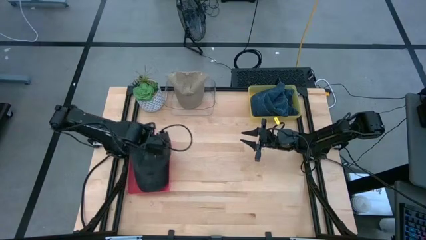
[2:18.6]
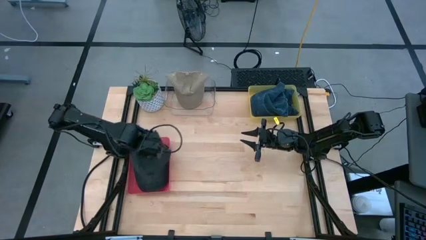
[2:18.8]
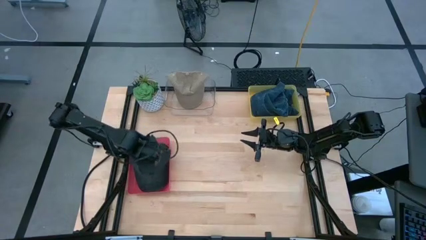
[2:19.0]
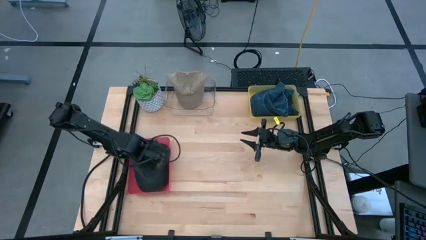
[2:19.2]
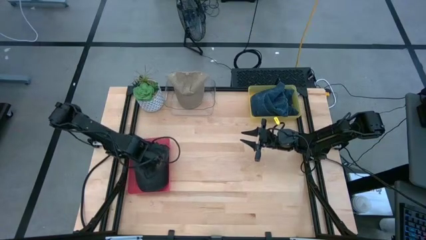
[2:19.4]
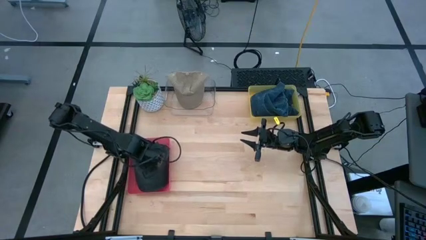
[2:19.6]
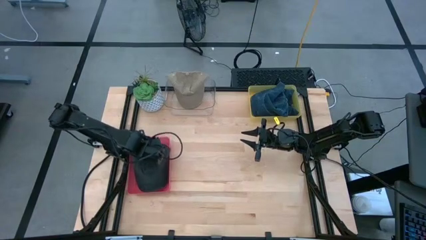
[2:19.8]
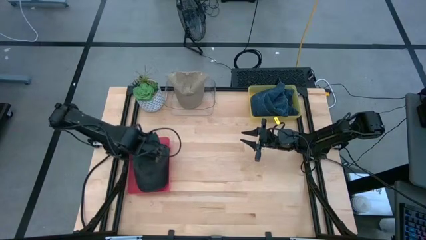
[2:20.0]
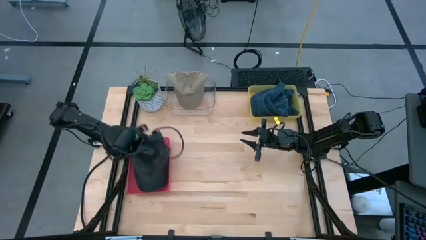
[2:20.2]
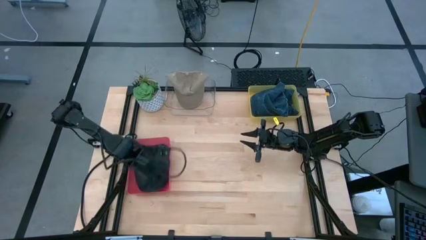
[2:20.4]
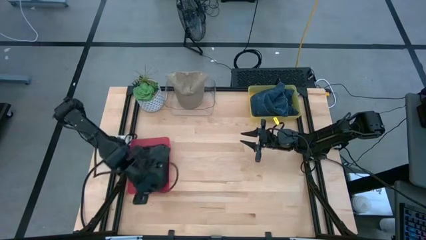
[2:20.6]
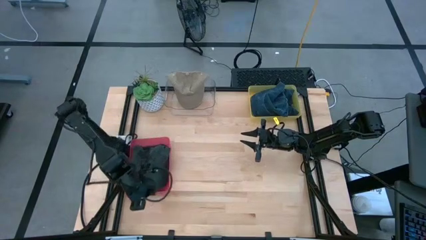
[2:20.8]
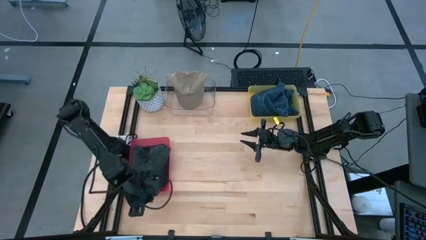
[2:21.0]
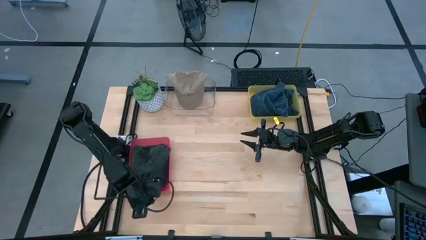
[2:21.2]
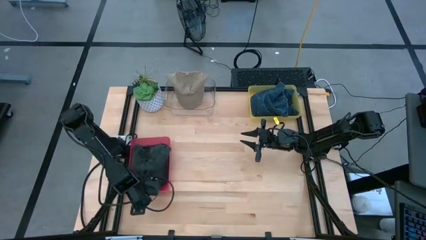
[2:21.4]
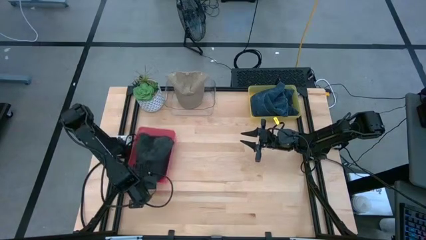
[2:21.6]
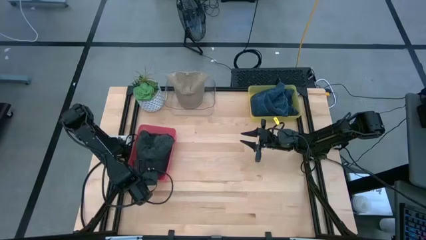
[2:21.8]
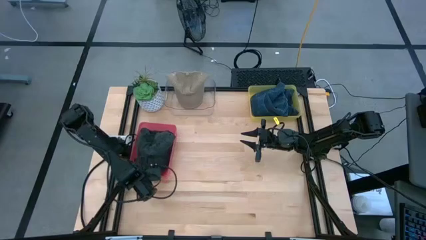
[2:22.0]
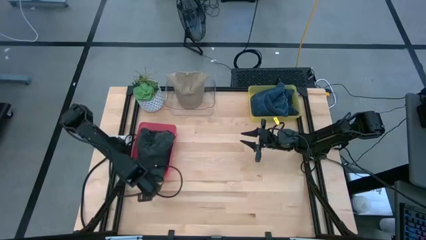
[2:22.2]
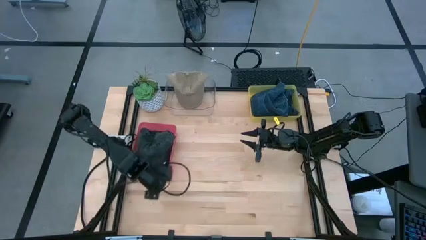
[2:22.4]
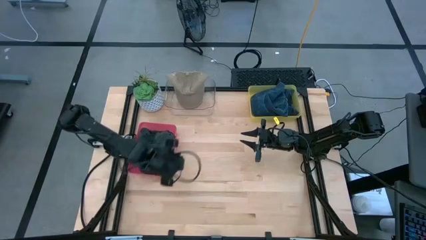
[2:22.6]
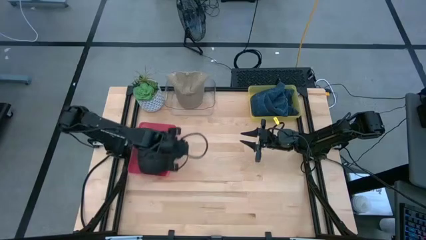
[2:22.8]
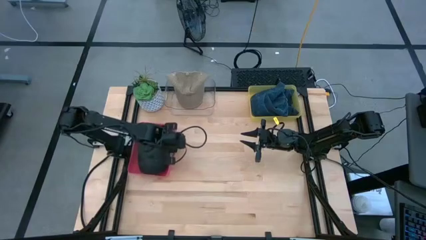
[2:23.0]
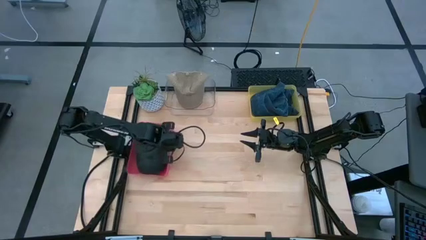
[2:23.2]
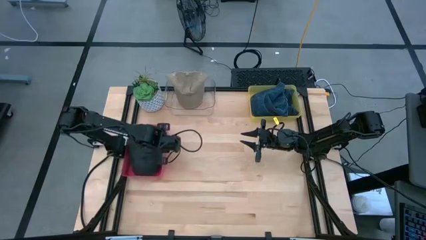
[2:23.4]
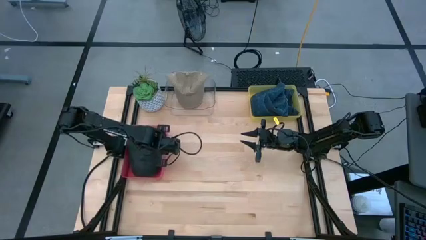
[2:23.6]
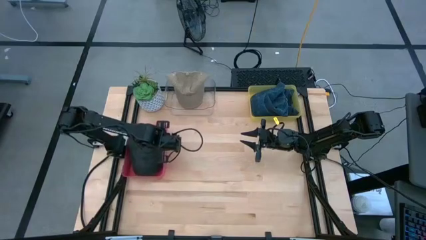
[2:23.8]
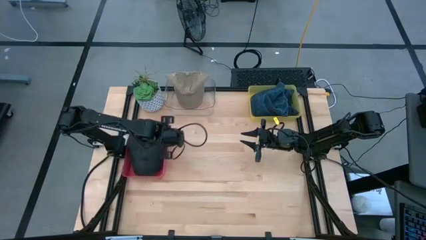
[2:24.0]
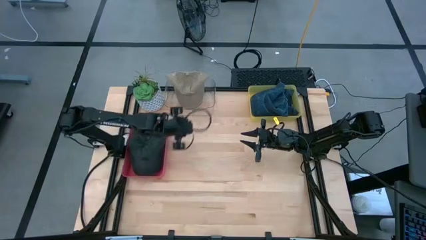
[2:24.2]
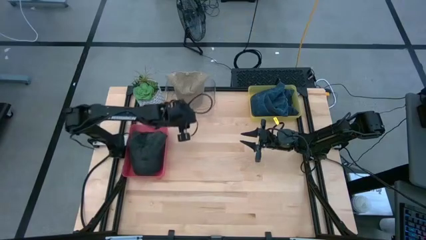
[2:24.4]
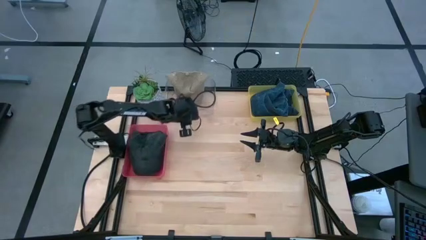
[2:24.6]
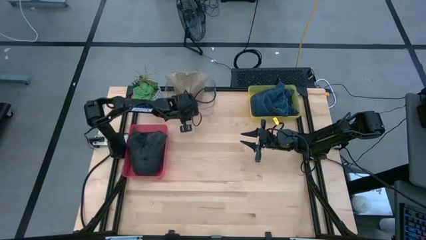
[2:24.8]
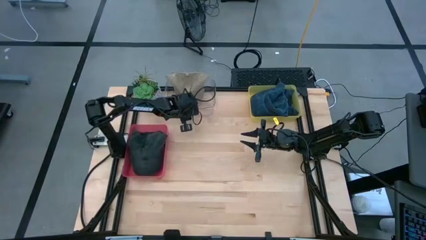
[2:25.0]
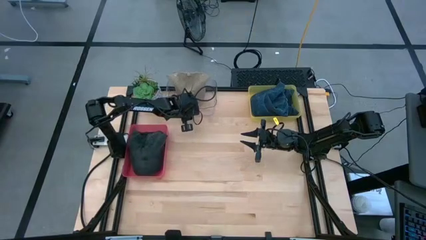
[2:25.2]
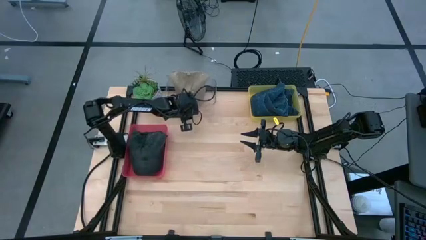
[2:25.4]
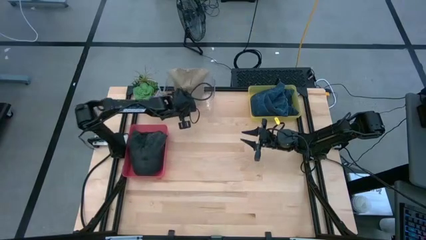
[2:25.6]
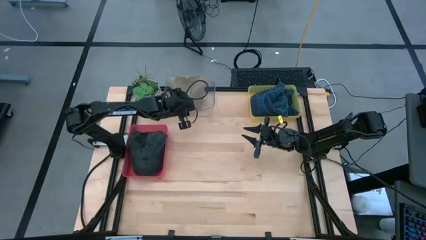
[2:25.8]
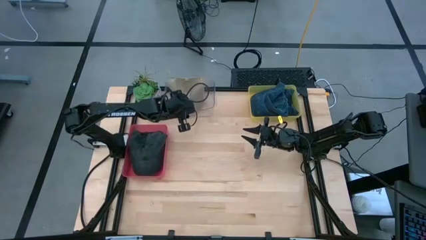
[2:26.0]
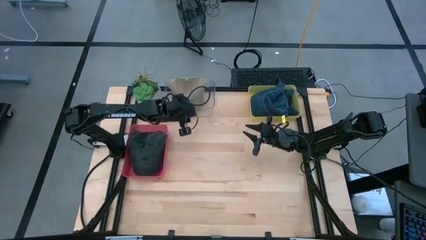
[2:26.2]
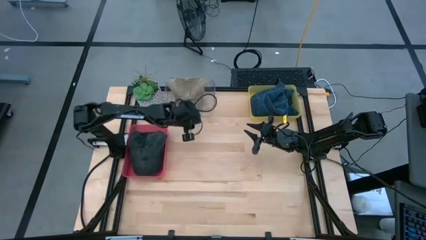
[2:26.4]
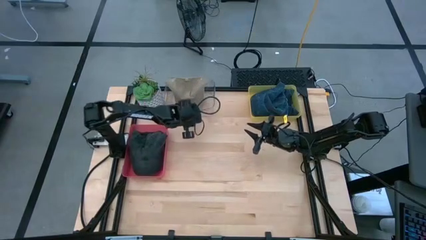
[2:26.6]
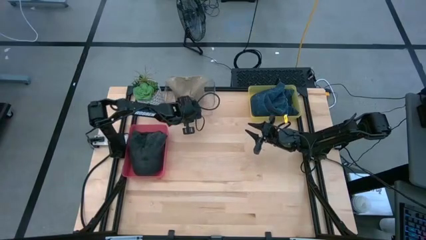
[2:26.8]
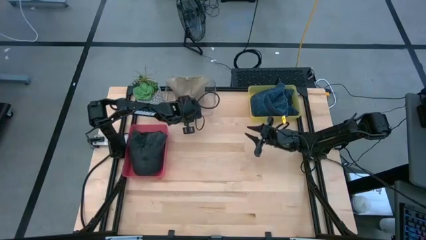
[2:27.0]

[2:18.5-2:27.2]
Task: Pick & Place hat
Adjust the transparent bin

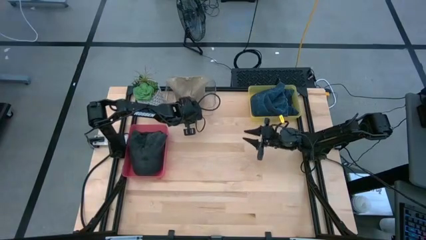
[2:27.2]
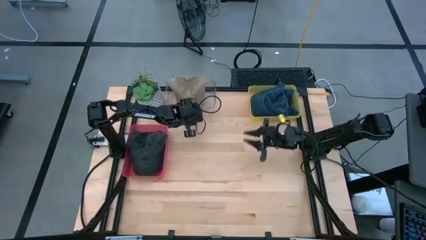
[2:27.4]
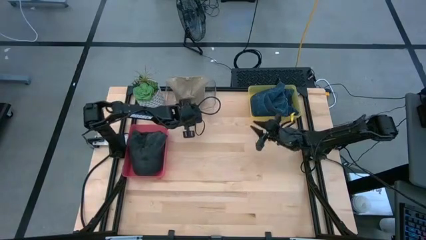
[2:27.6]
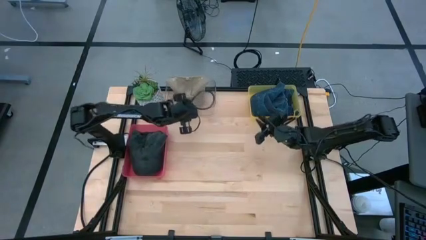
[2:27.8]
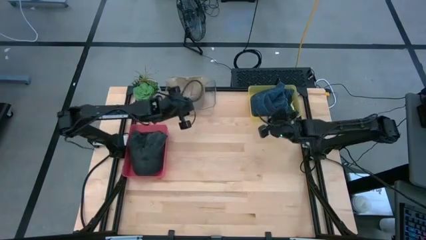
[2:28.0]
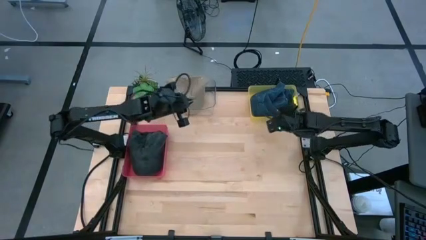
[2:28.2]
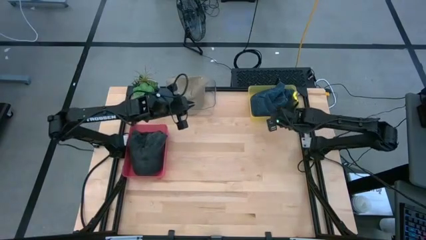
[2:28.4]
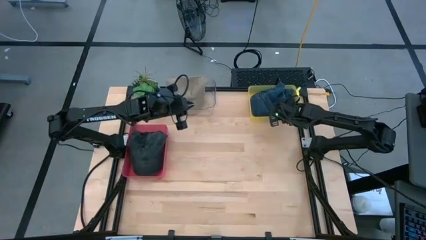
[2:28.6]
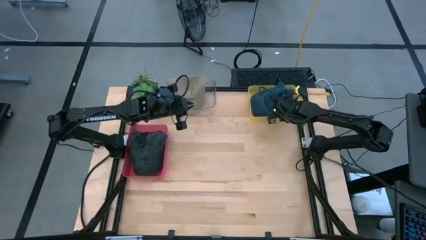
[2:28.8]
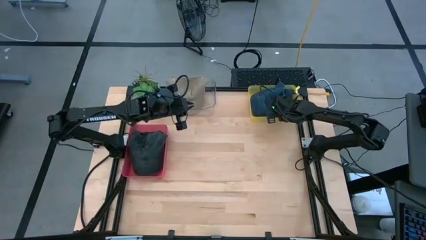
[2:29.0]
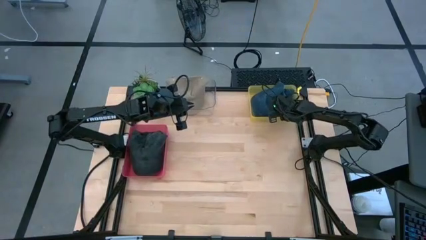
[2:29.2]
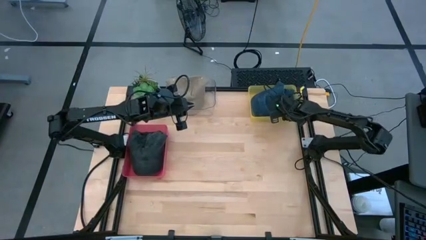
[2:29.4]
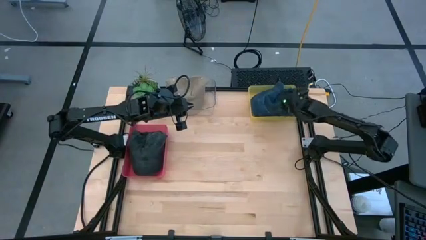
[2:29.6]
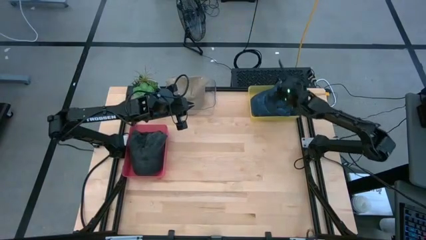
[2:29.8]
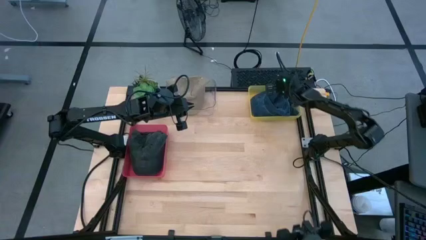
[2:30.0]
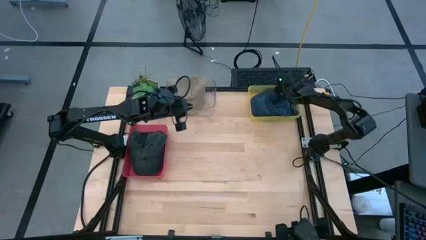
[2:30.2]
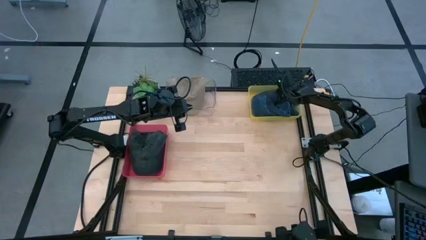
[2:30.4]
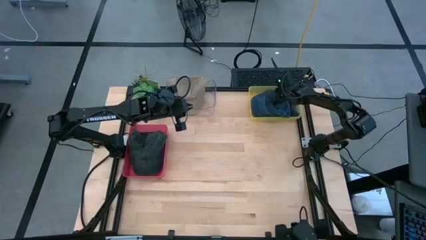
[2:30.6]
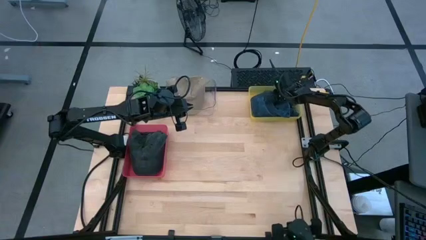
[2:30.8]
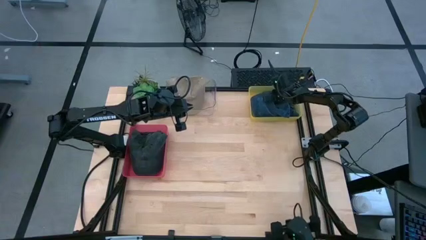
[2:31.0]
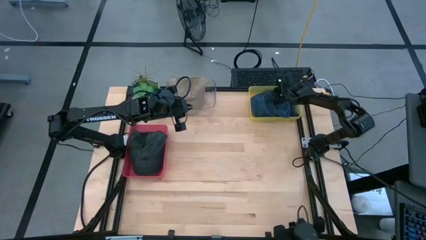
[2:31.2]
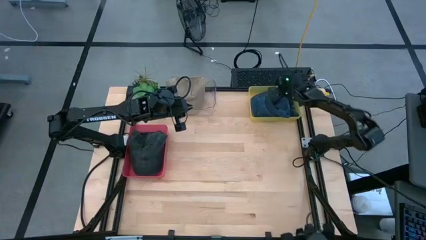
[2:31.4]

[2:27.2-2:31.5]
Adjust the blue cap

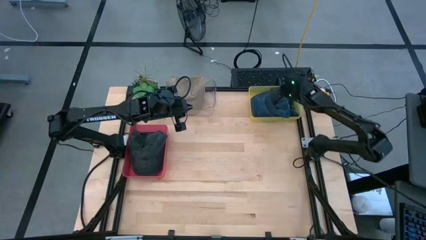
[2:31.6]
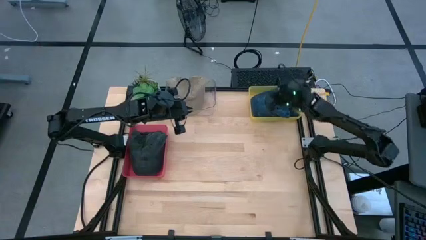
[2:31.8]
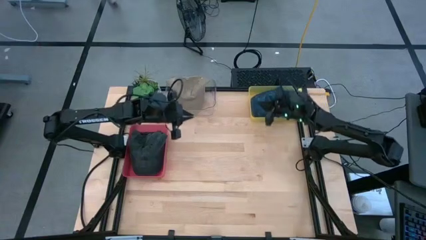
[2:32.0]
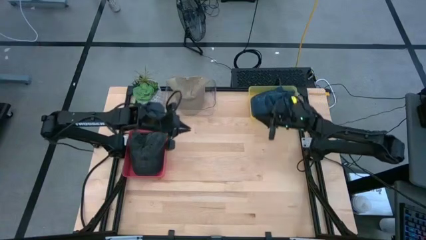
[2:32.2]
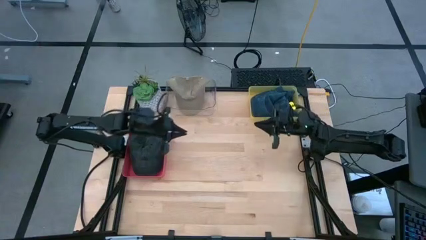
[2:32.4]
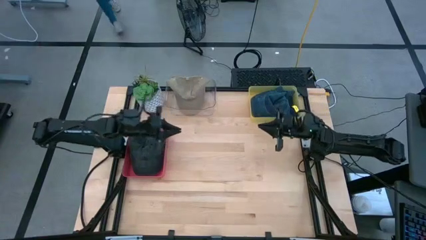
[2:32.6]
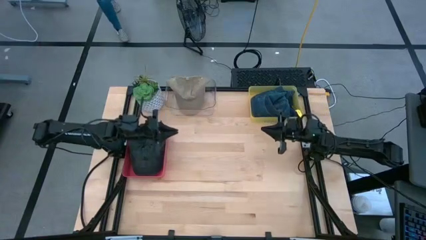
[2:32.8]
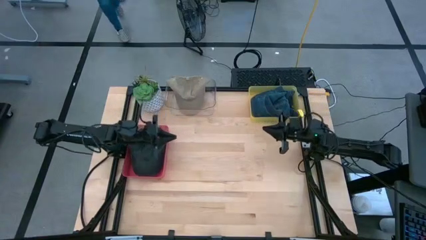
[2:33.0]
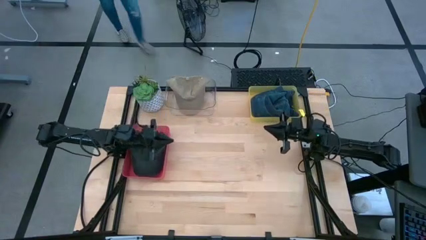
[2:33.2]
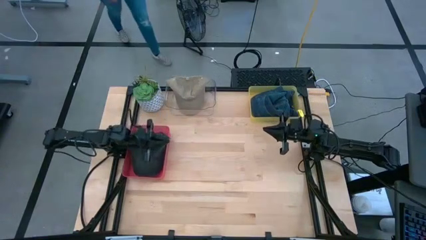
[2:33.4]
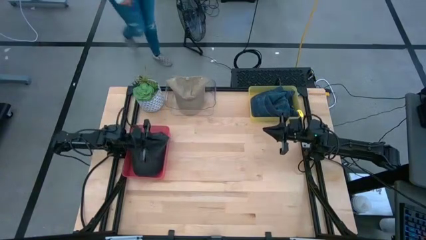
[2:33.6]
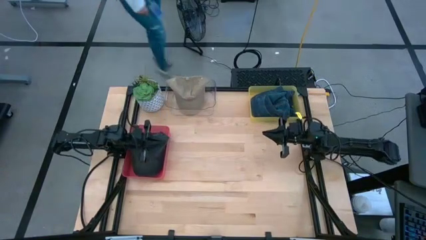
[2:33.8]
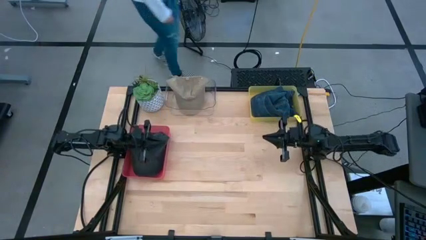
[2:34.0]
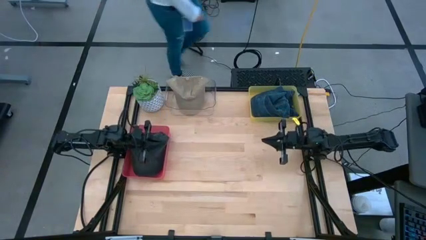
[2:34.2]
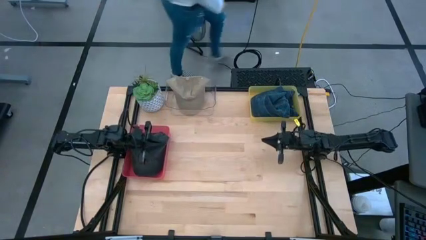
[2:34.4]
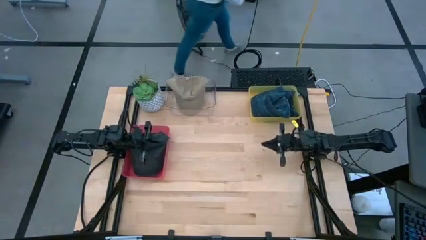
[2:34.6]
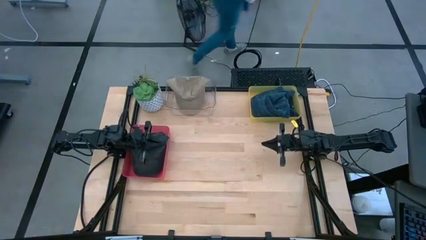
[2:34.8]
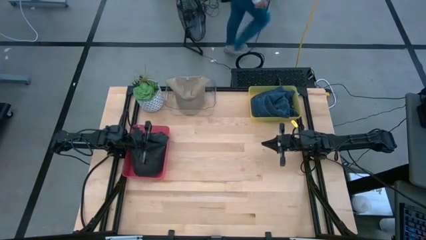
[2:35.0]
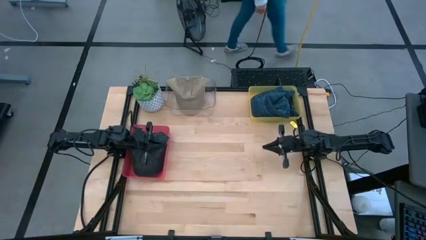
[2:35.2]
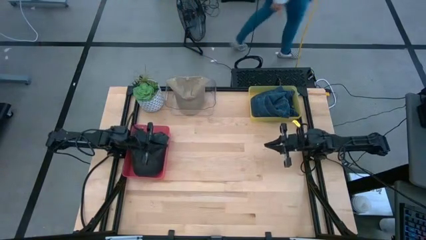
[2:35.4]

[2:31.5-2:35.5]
Return to Home Position

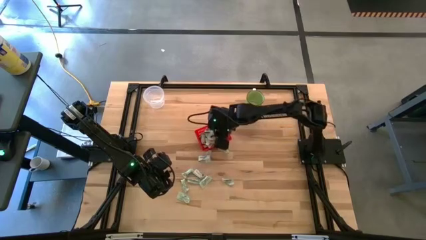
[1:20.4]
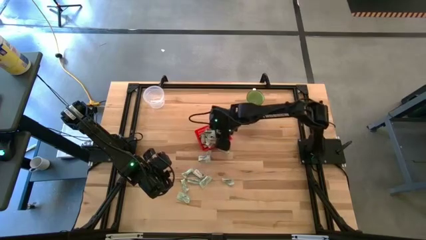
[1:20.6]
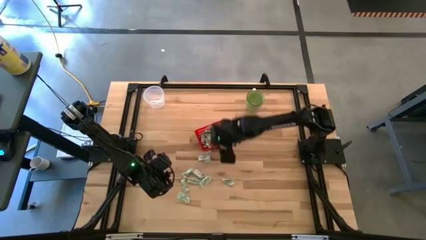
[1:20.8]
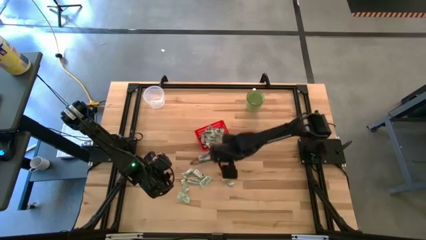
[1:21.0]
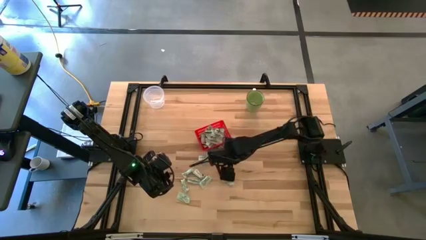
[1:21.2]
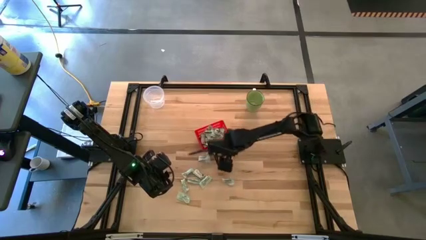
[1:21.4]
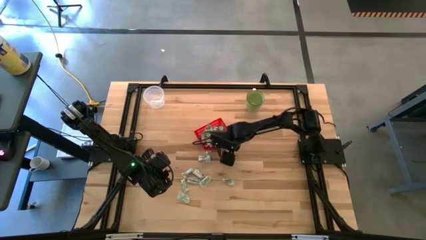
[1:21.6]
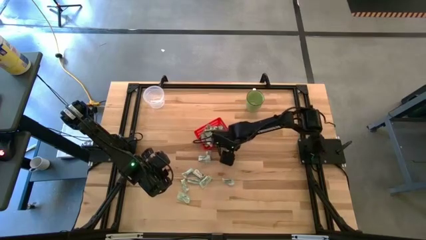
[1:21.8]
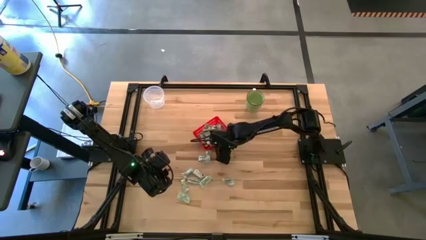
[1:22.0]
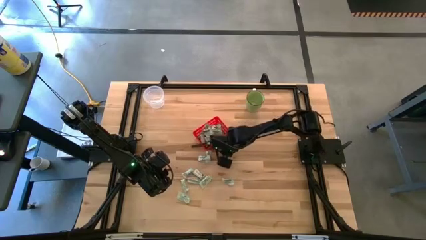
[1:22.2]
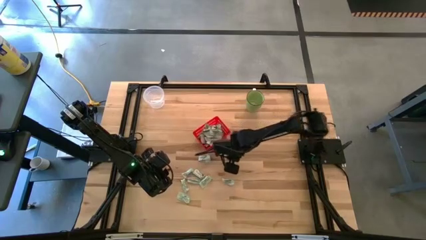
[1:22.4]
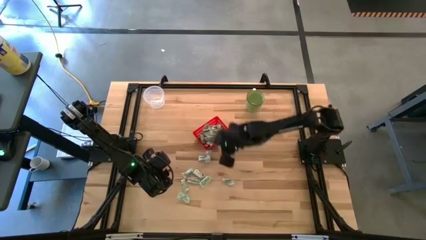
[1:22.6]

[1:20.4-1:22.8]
Task: Pick and place Stevia / Truvia into bins
Put the stevia packet into the red basket
